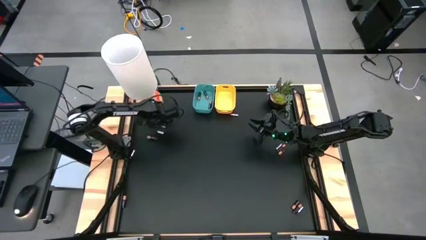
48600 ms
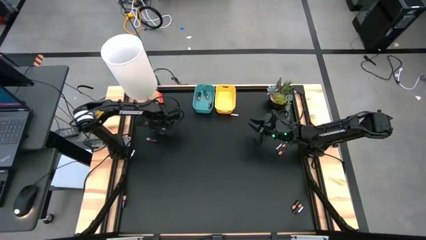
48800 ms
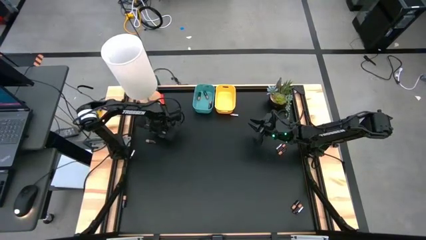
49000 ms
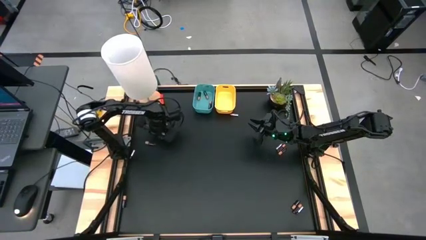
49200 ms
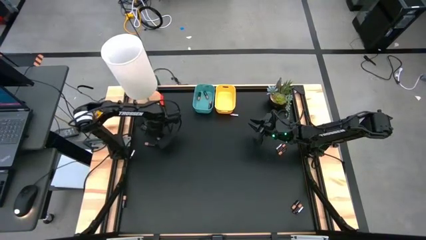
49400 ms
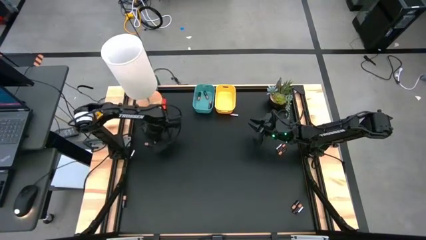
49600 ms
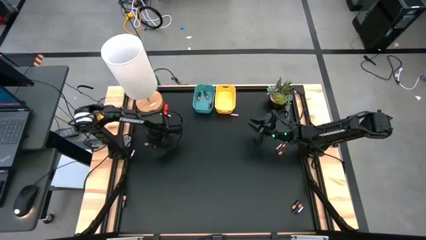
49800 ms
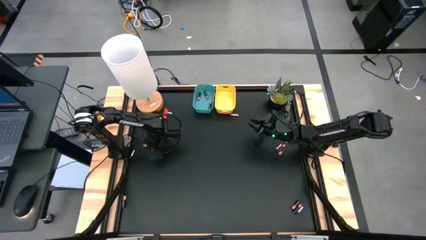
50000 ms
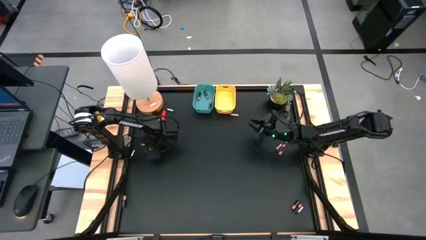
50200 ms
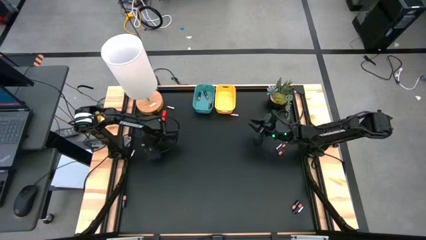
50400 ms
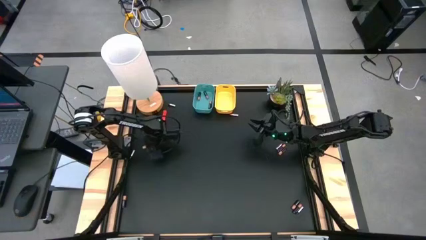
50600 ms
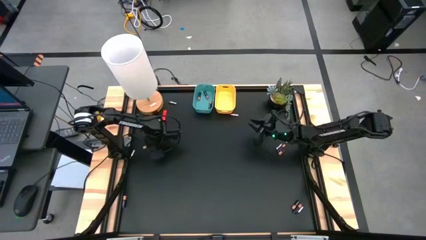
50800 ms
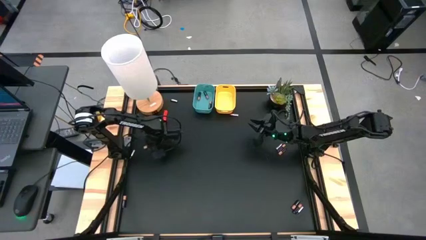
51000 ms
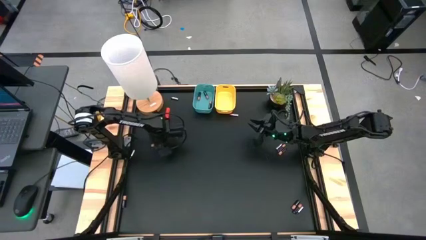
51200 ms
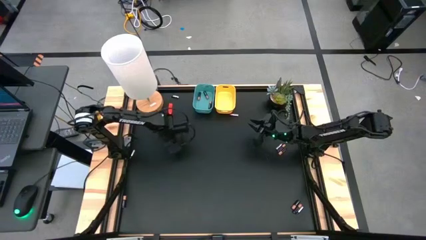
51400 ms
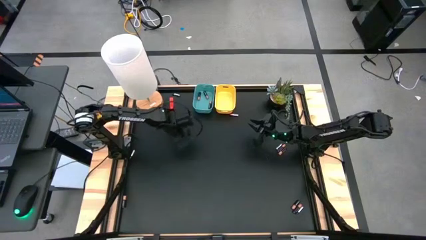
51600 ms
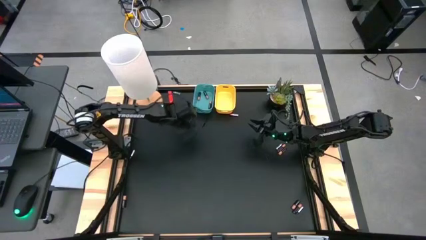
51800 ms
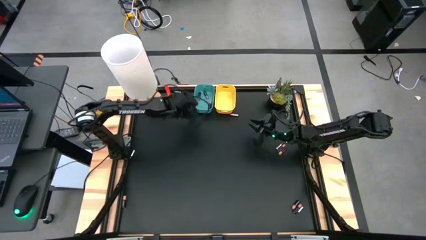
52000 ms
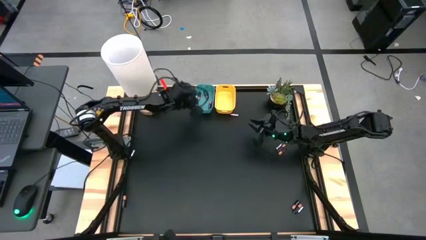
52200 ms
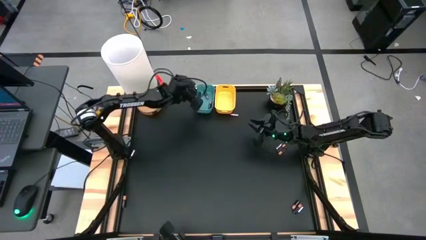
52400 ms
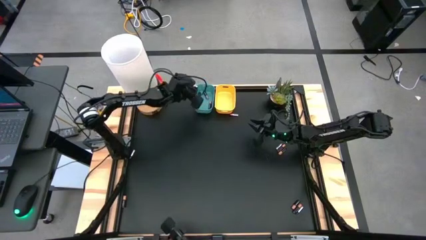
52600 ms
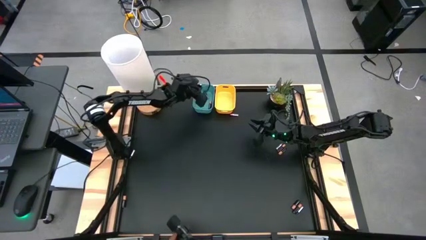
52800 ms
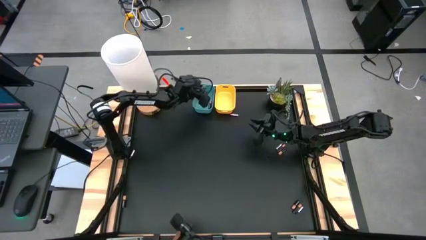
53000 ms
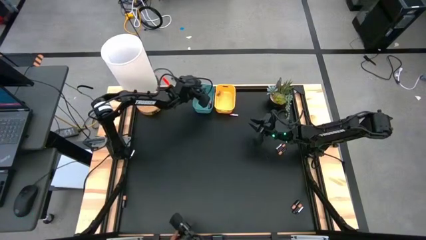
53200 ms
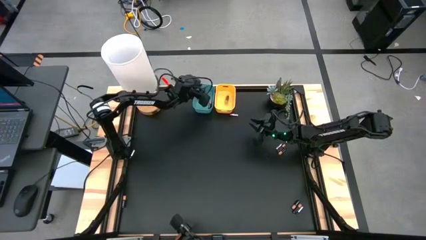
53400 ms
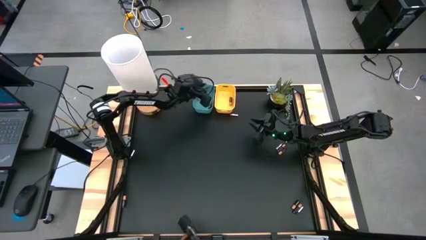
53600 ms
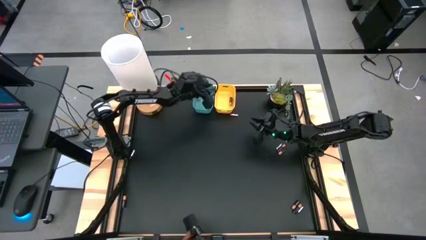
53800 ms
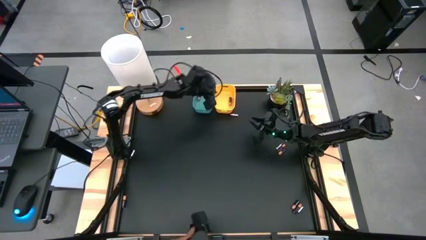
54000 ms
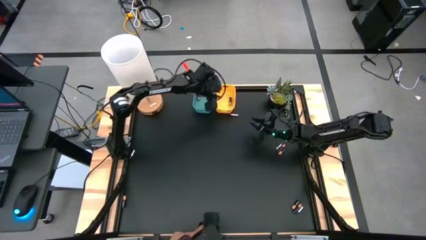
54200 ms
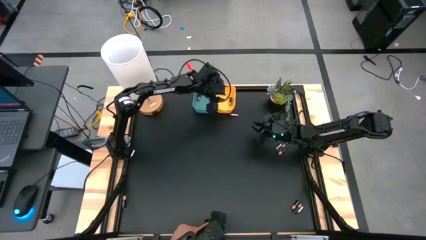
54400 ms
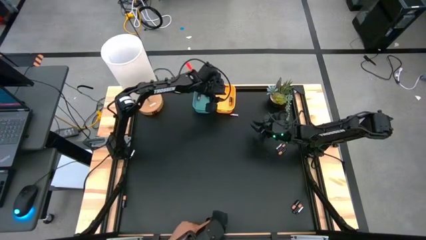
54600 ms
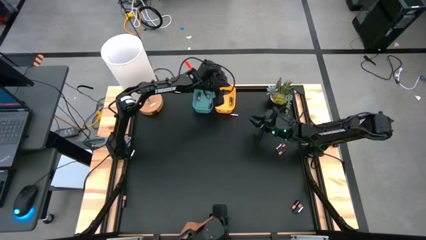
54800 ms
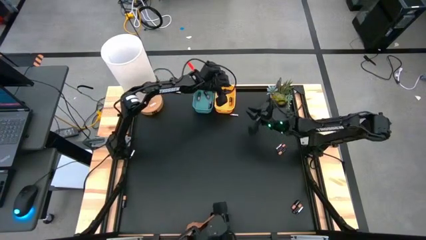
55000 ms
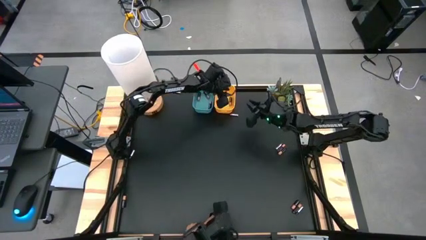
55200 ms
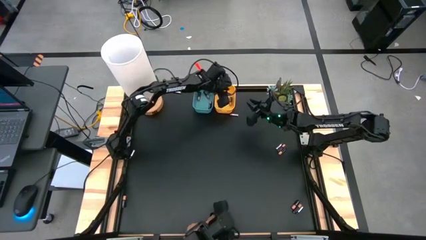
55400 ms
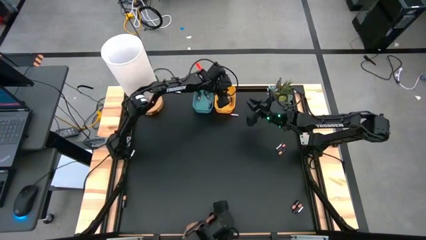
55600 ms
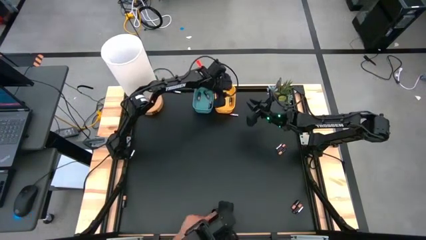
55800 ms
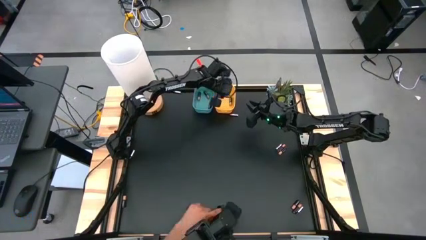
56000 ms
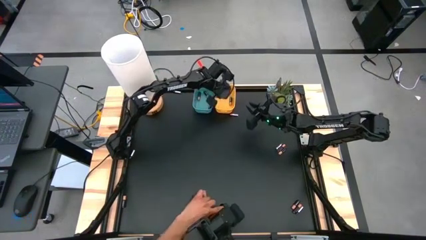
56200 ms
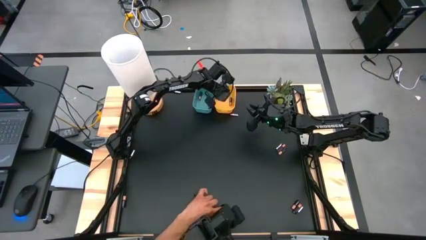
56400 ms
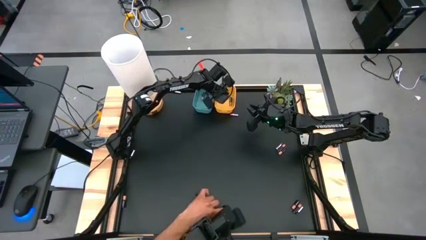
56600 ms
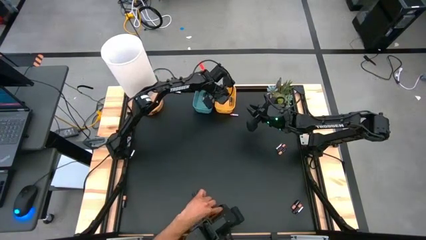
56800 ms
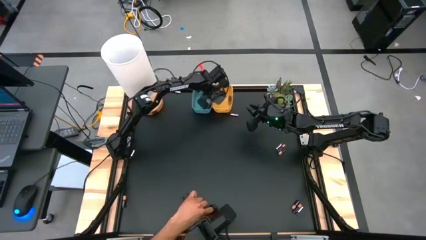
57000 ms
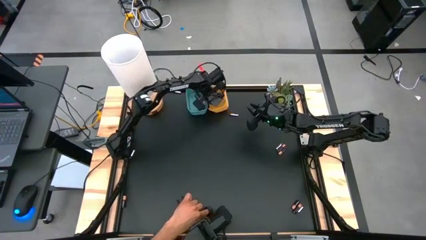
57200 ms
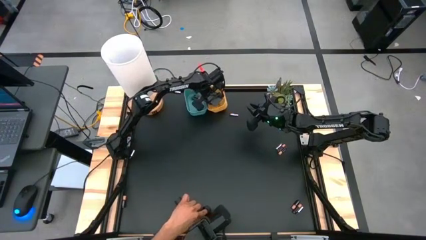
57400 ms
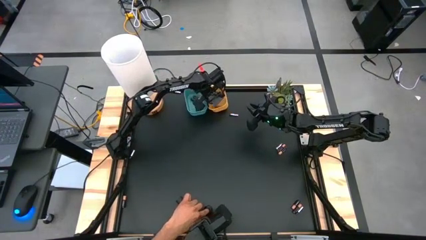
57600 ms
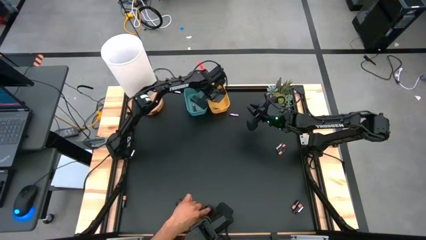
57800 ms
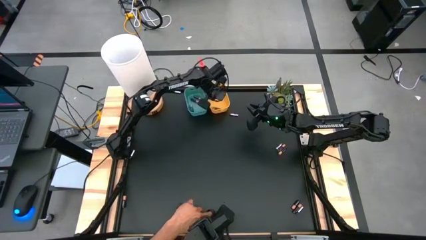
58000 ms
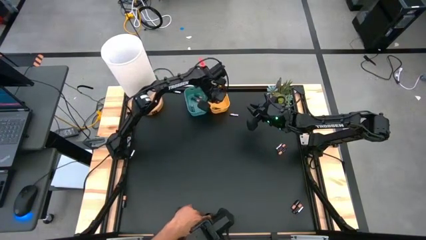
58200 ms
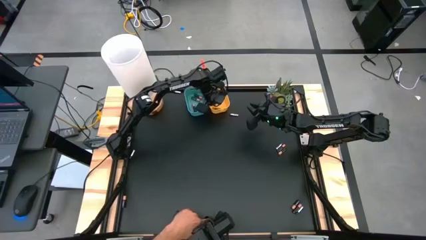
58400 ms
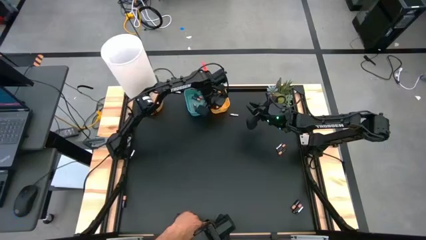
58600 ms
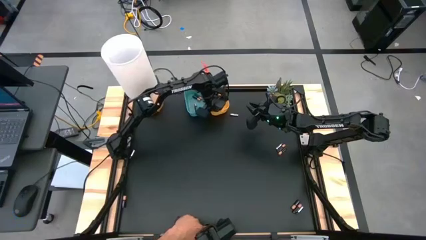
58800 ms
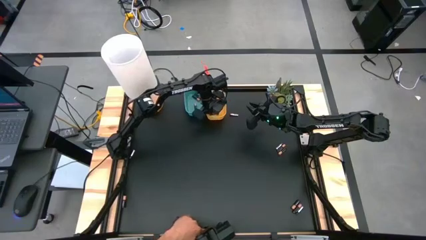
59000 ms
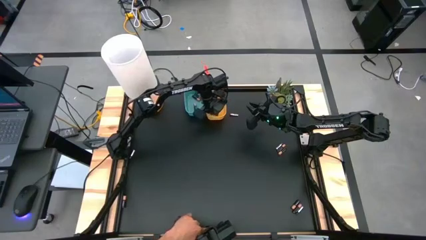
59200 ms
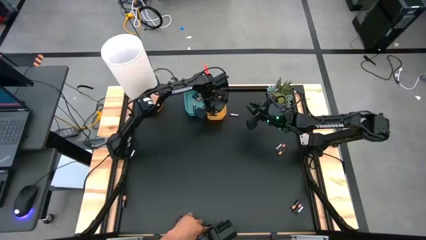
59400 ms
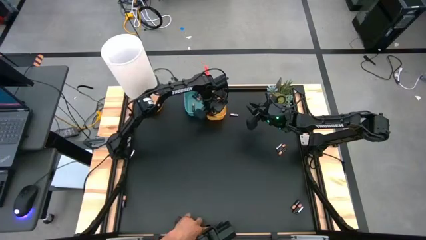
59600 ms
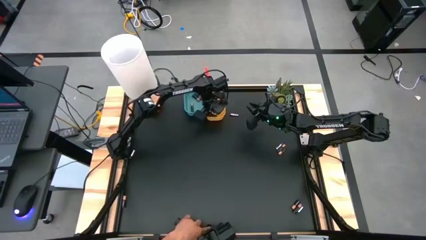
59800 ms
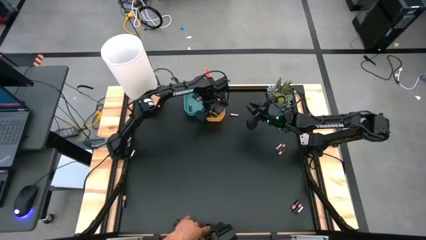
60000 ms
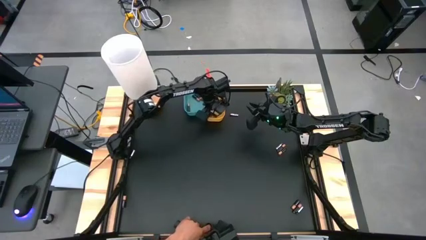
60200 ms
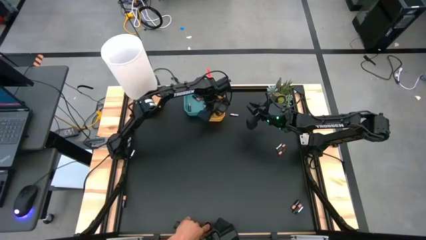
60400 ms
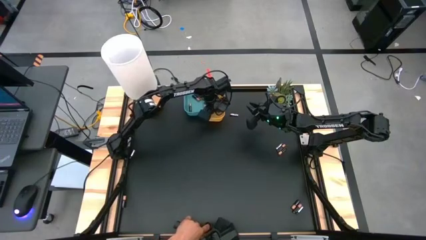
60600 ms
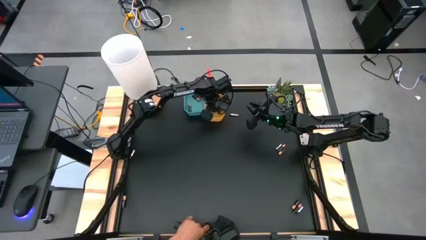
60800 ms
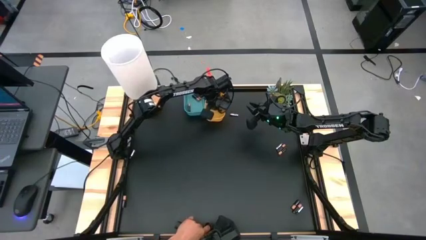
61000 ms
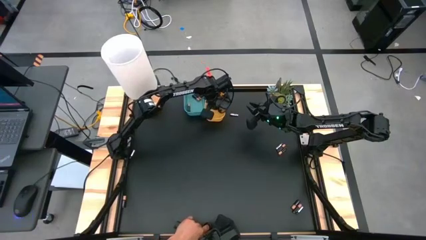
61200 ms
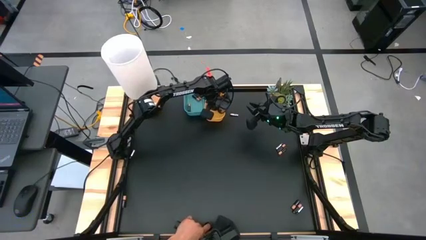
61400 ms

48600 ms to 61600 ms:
Task: Sort batteries
Put the gold black battery into the blue bin

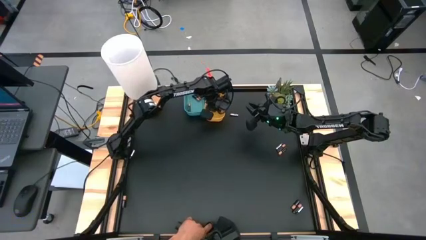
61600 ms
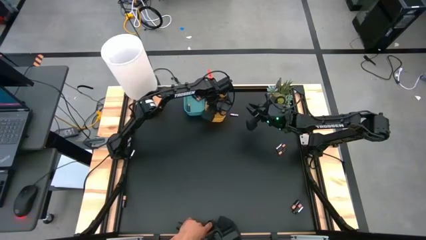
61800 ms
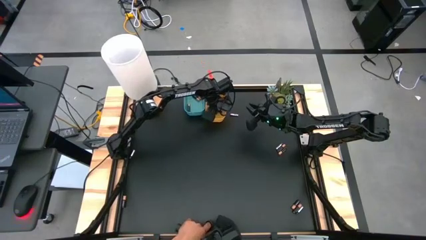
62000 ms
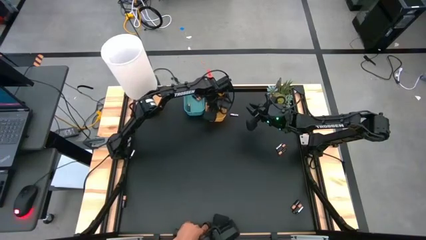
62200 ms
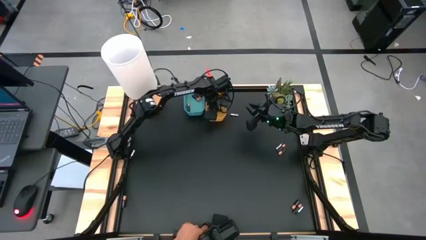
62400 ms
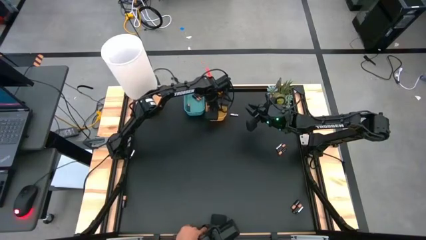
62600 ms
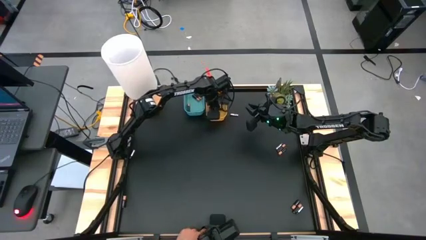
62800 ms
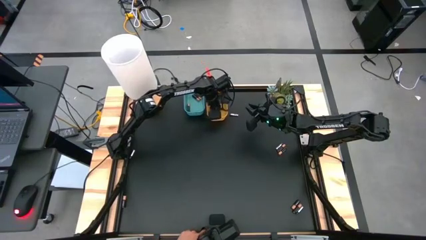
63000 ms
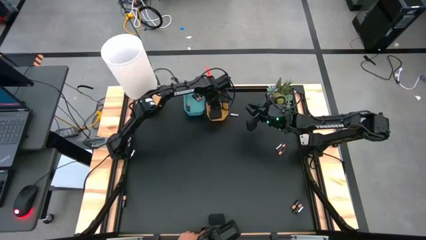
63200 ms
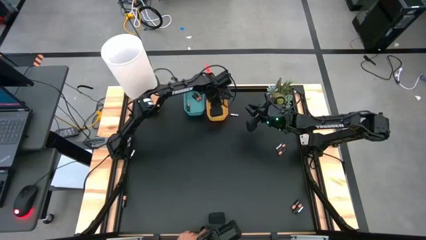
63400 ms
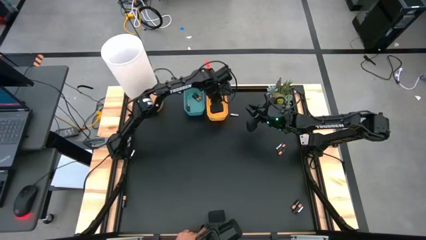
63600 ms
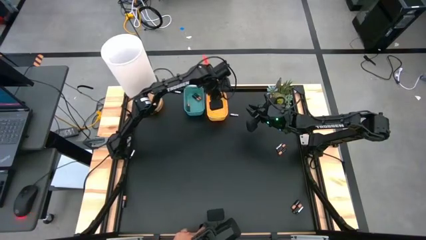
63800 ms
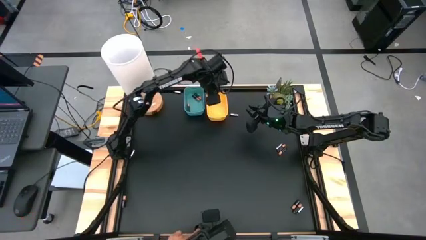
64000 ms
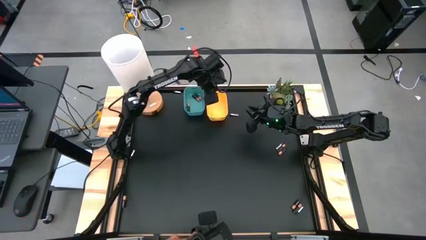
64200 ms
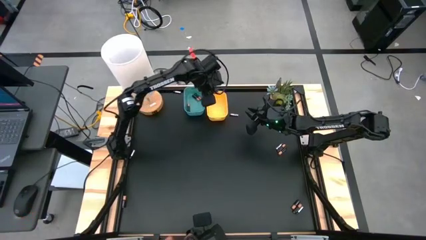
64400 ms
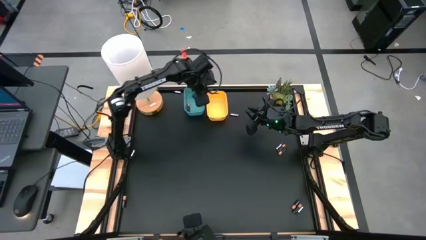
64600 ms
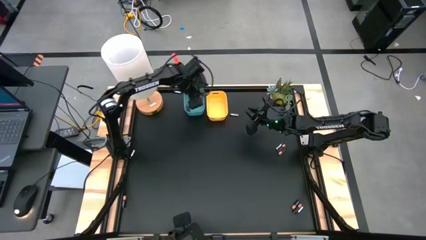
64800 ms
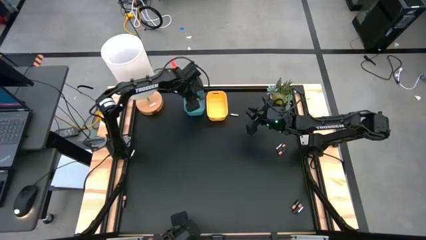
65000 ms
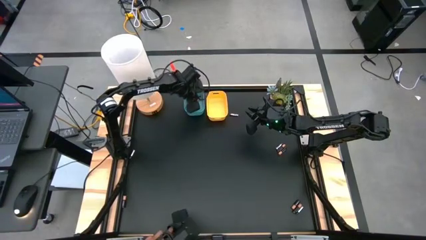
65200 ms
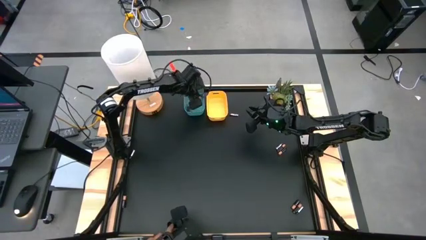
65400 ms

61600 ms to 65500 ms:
Put the gold black battery into the blue bin
